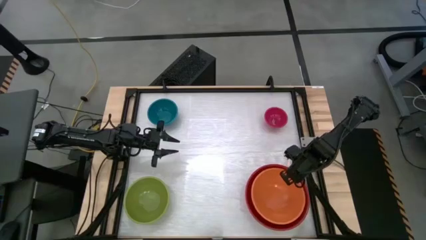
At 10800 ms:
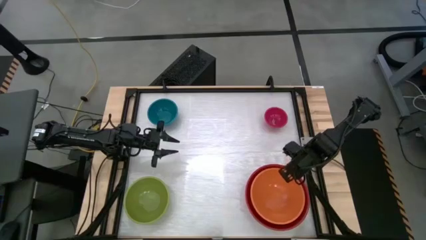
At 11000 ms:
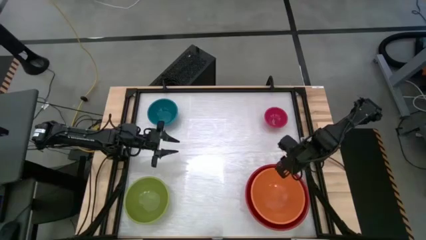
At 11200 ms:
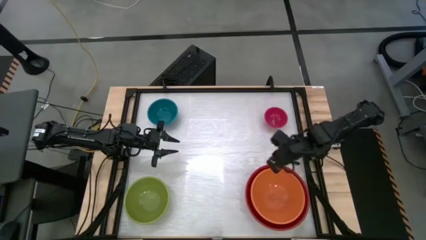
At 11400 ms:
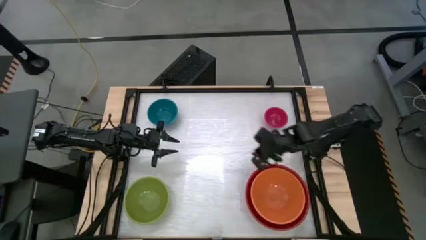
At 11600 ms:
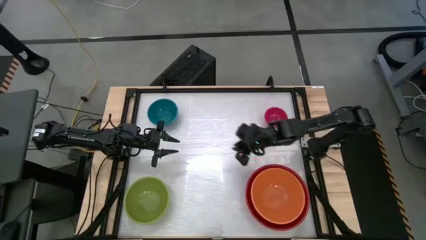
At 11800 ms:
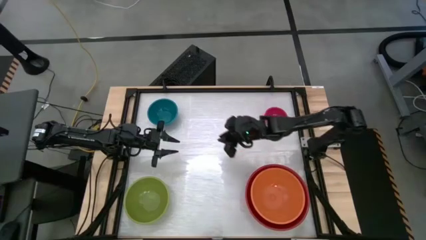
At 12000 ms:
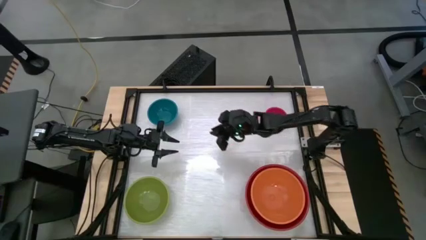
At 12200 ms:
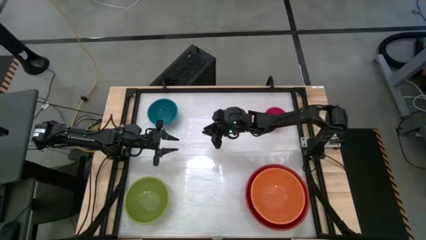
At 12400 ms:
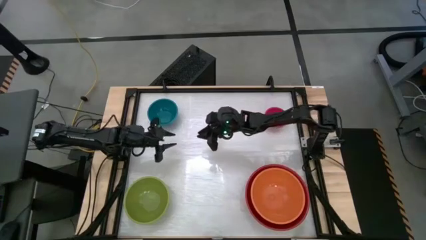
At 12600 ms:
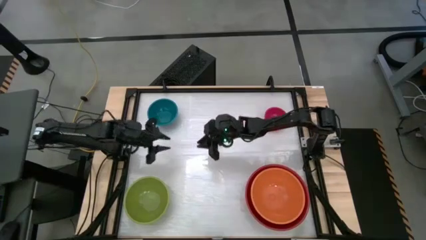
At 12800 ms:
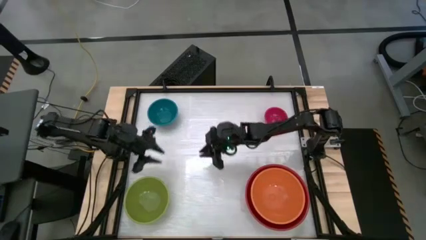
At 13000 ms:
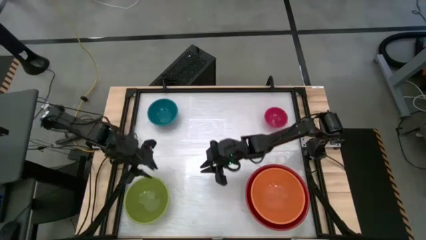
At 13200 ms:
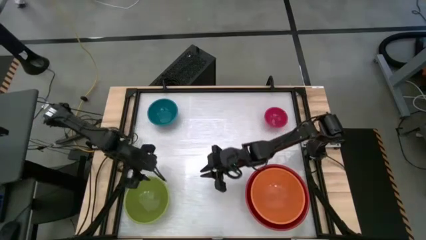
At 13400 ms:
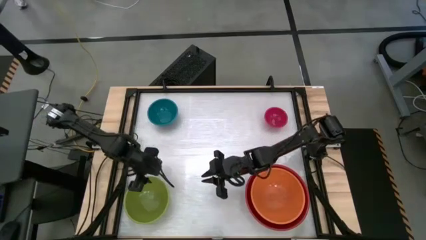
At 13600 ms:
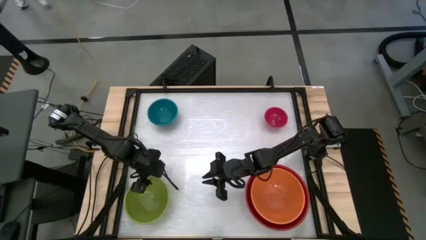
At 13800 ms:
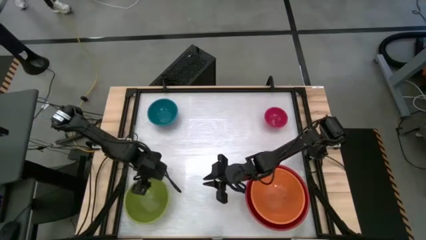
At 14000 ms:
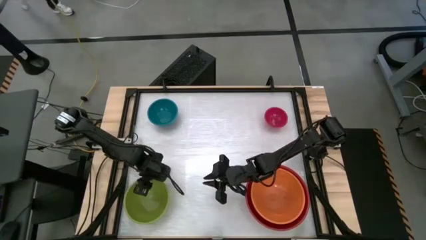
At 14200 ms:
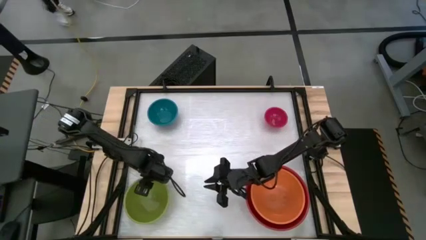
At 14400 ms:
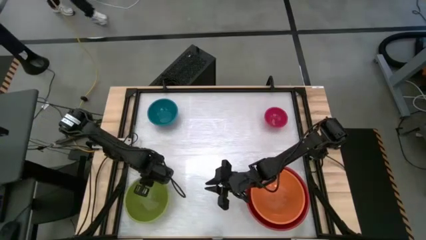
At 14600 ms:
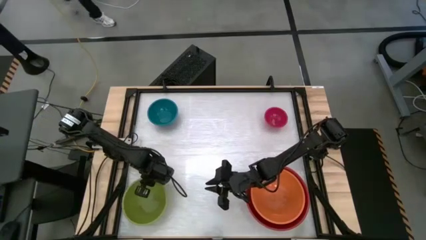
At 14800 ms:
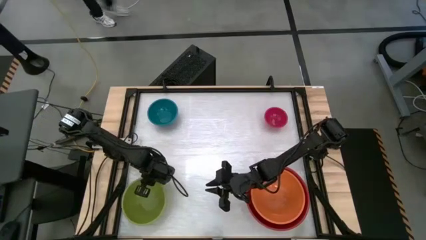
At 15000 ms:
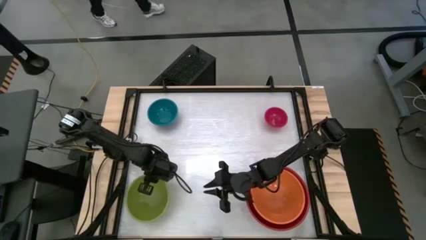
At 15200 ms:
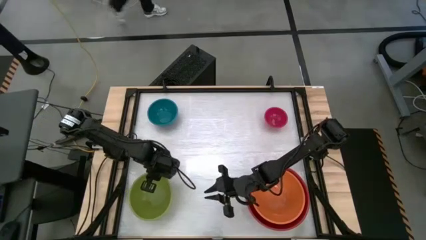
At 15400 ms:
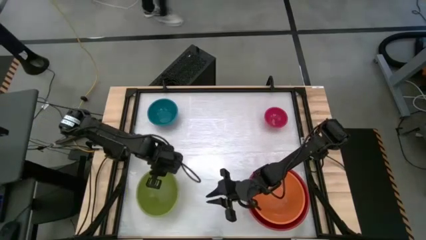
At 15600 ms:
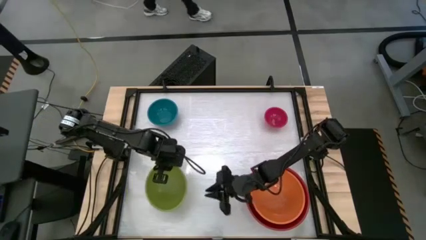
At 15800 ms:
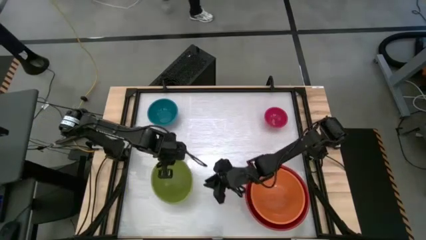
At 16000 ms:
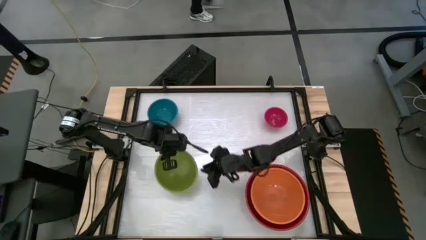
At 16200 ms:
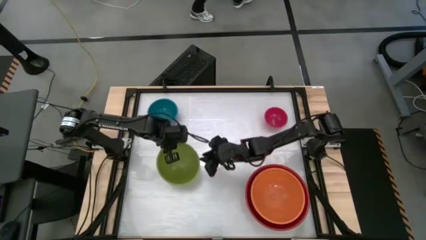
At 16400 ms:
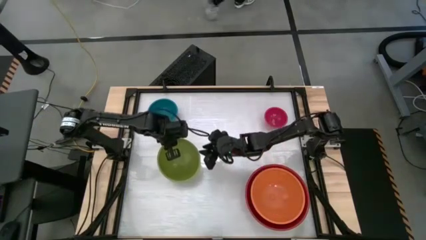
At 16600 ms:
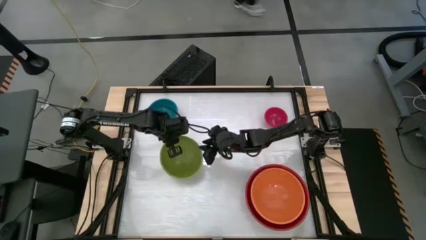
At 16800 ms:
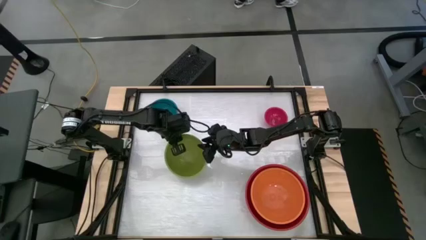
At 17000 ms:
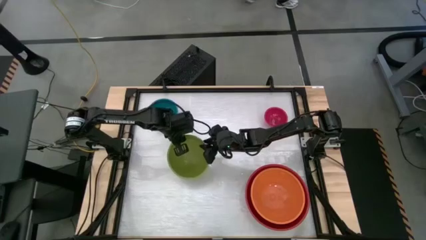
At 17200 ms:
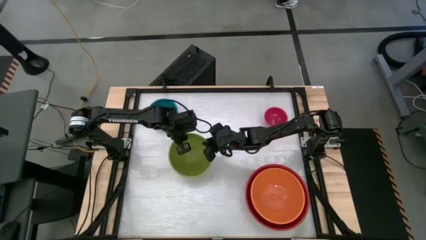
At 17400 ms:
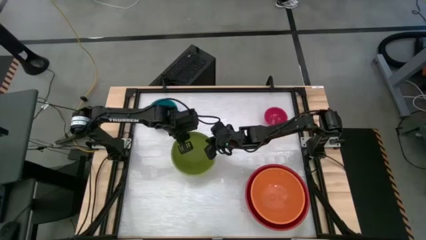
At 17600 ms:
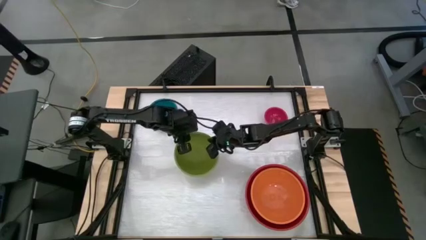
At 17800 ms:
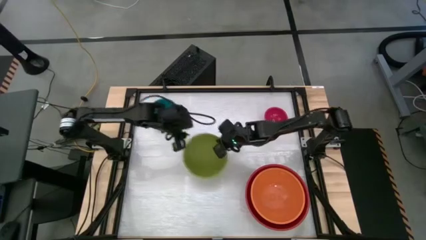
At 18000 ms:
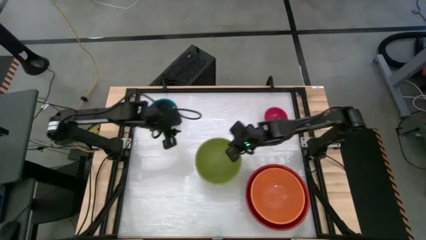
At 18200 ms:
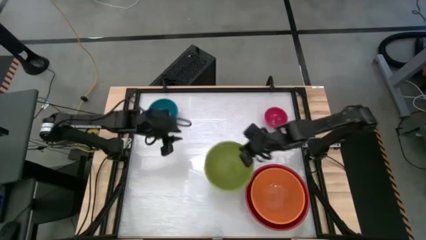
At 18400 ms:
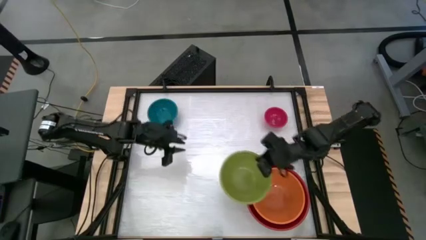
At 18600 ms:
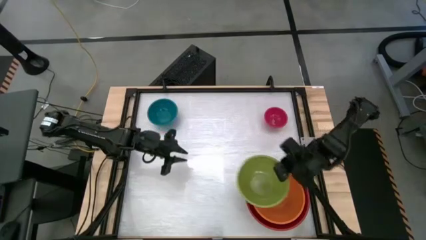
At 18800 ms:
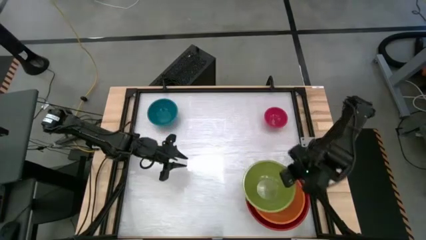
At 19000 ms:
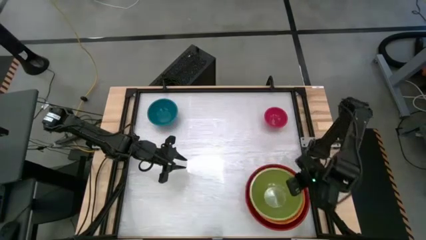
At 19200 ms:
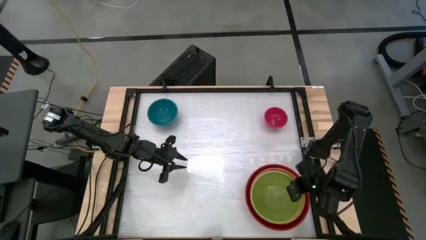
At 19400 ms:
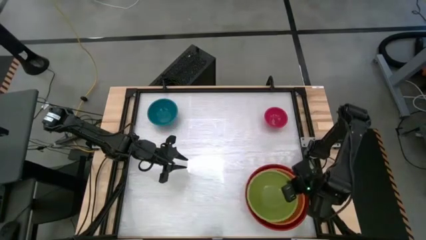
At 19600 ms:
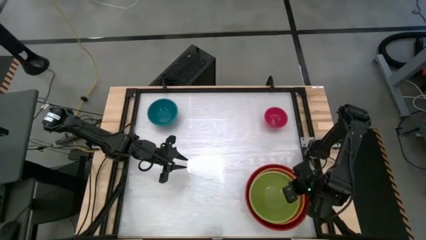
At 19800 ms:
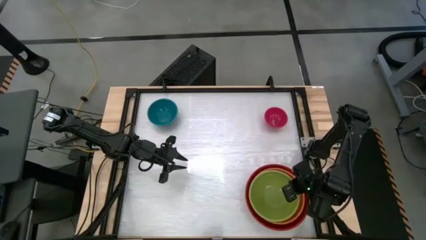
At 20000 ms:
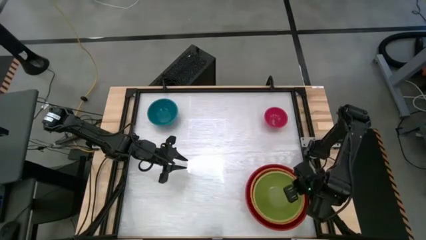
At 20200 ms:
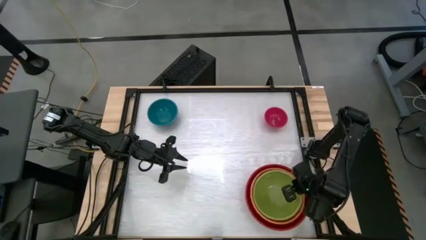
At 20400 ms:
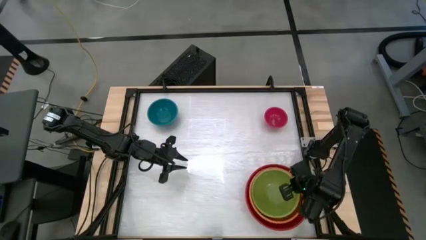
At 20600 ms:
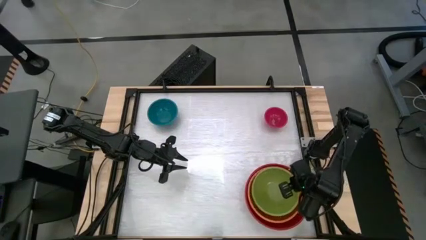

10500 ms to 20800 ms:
Stack the green bowl on top of the orange bowl

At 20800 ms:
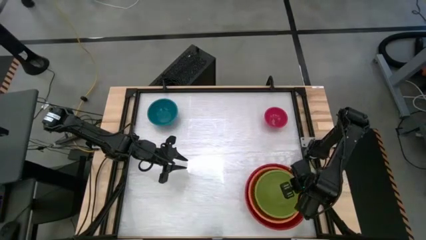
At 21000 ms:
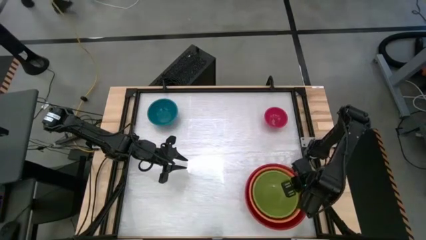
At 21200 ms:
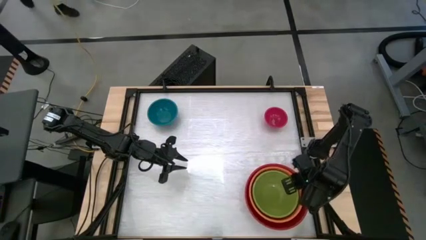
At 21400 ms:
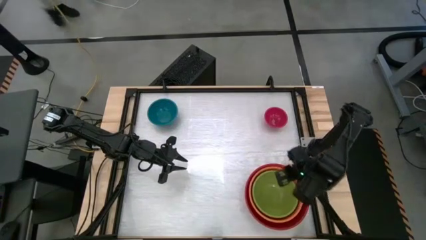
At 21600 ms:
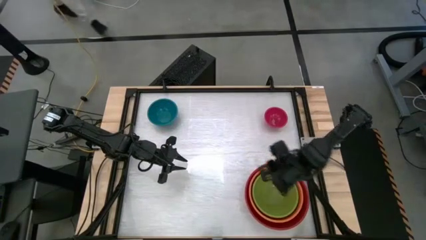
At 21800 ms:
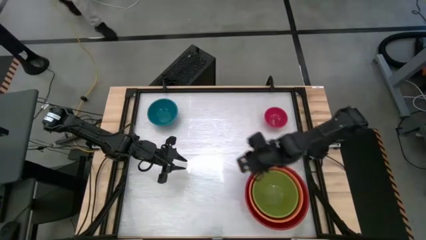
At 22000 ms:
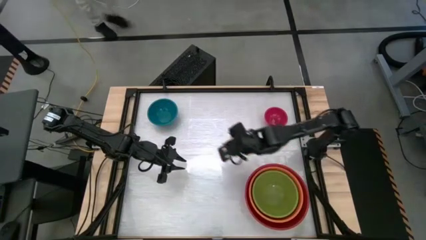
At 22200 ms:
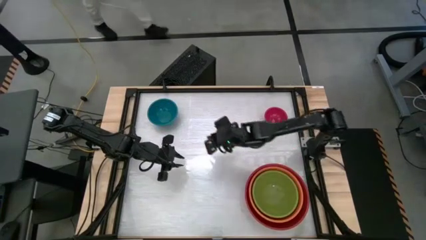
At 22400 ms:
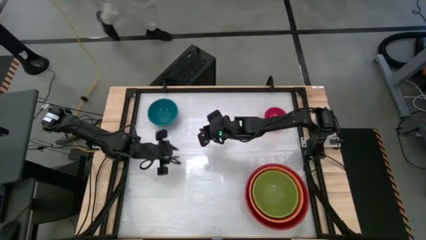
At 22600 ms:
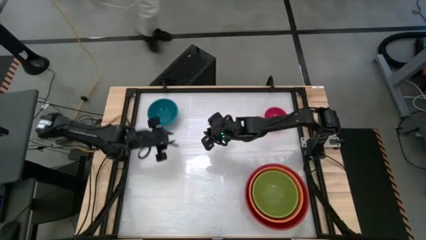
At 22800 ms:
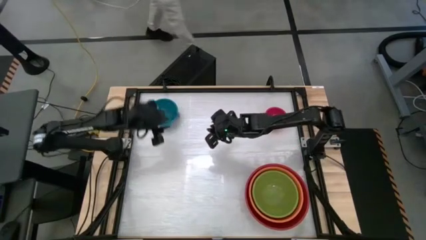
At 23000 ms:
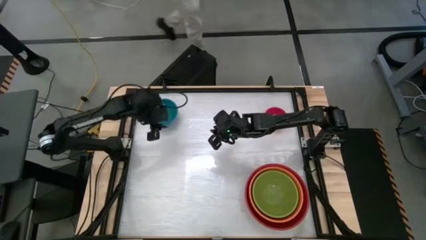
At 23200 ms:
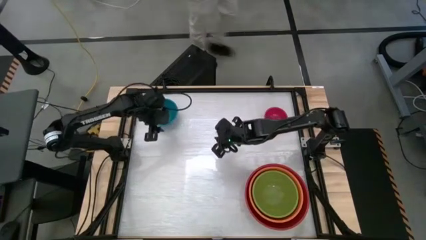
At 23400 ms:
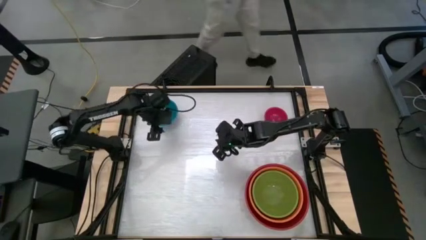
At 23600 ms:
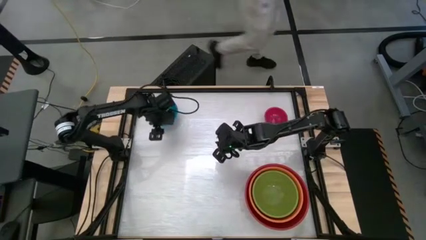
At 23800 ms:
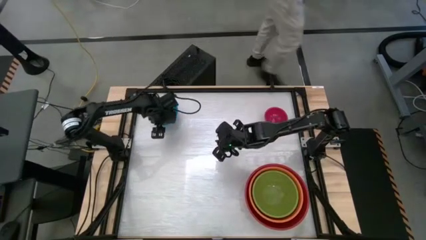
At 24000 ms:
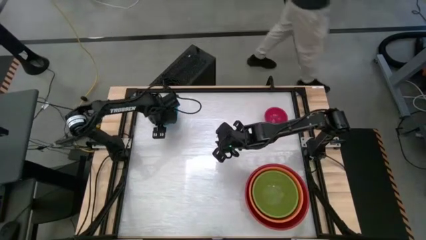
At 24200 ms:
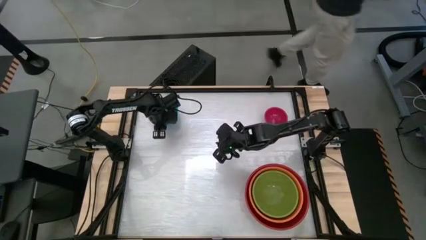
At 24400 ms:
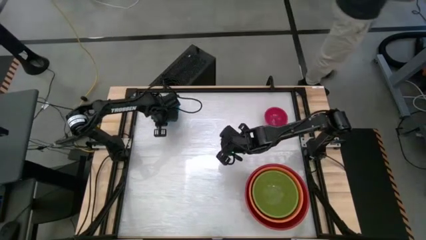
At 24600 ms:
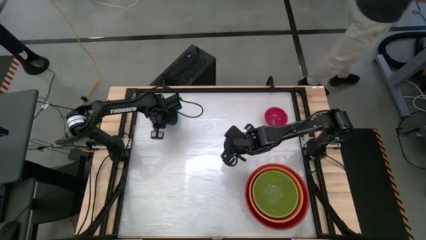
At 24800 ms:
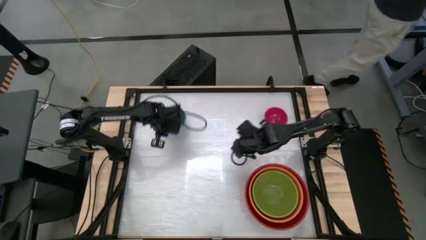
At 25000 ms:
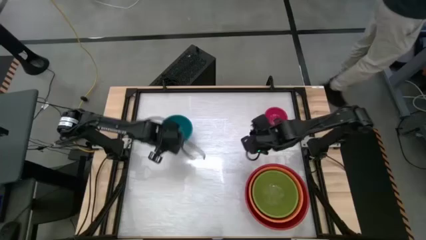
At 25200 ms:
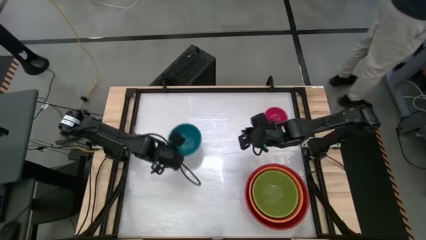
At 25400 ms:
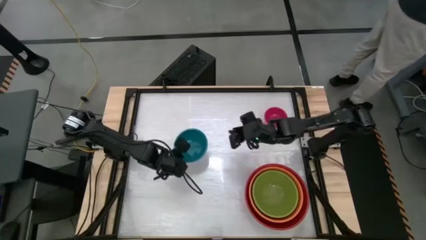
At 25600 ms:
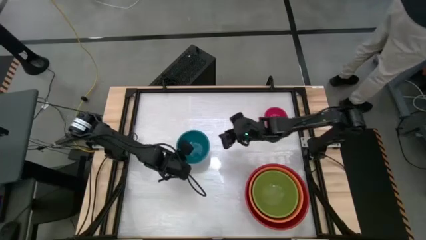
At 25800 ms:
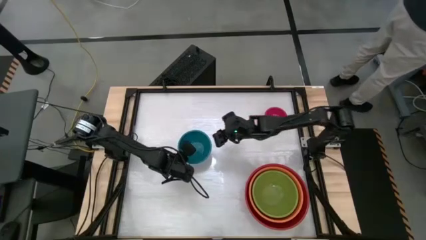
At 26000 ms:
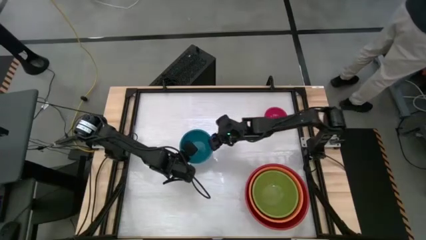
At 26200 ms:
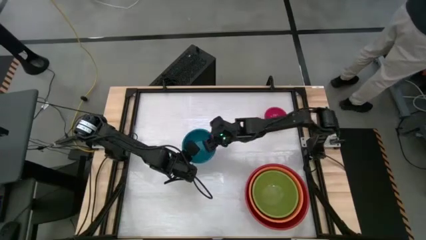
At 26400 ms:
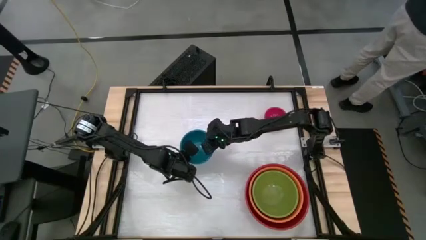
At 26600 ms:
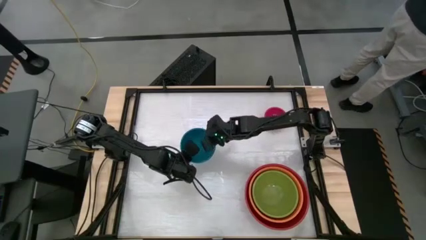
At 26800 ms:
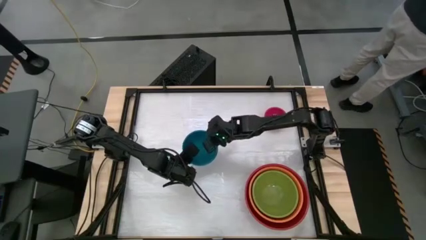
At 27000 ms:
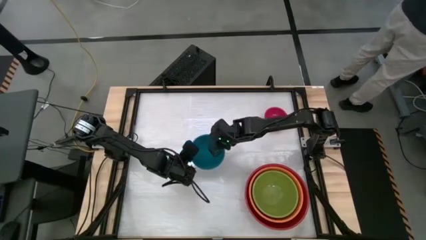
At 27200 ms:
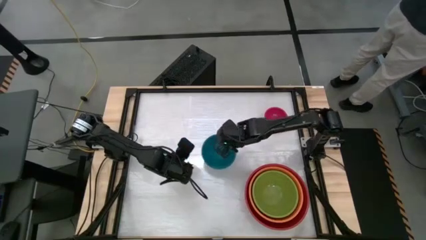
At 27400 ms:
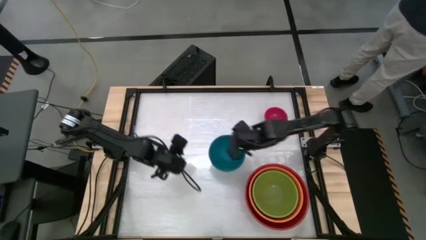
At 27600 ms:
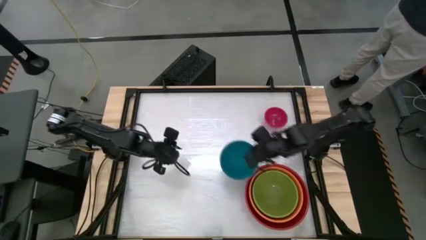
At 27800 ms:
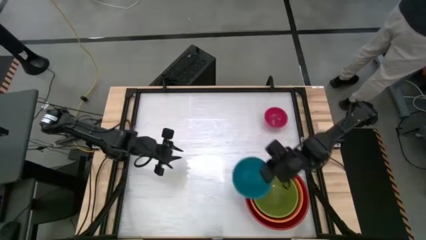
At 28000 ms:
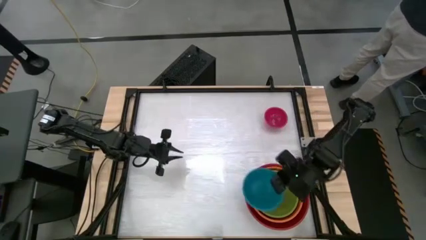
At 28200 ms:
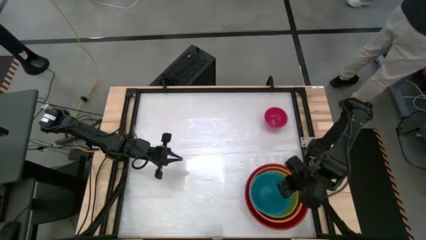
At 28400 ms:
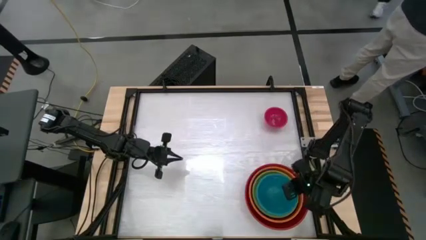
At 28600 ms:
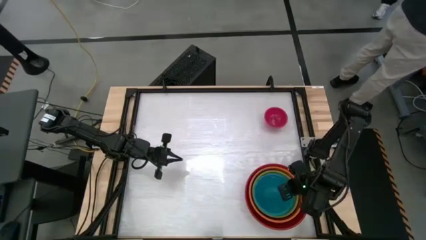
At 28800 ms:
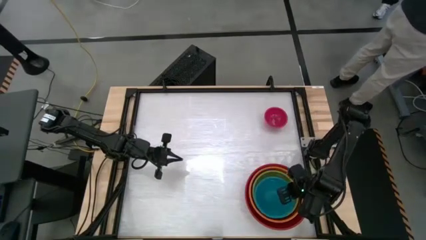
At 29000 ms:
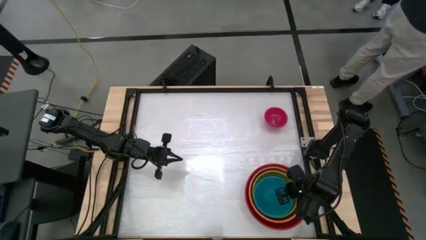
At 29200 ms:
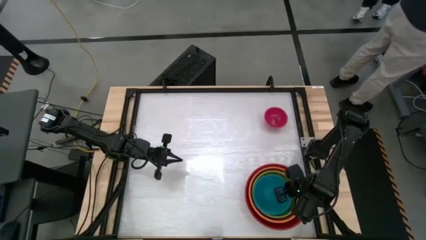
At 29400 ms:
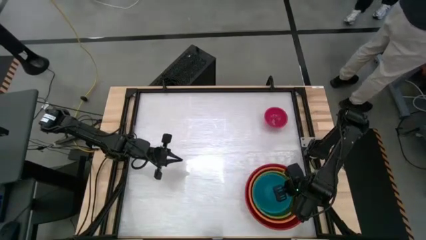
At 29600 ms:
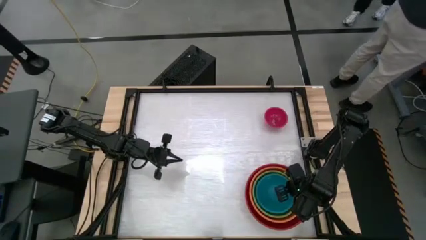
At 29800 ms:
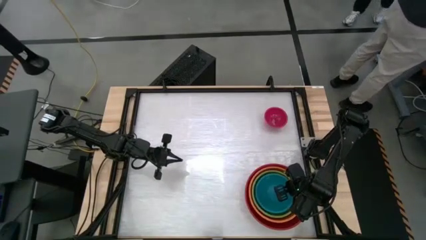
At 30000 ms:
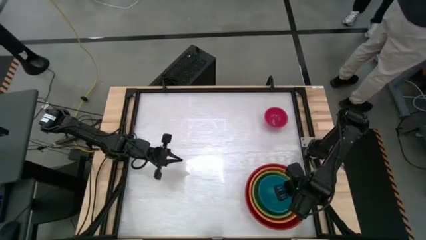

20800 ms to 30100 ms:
Stack the blue bowl on top of the green bowl
